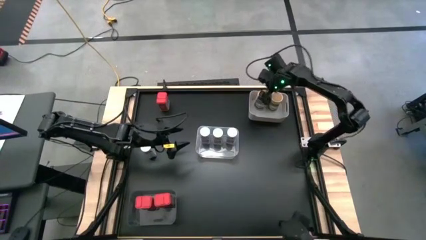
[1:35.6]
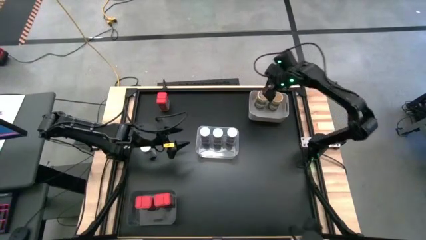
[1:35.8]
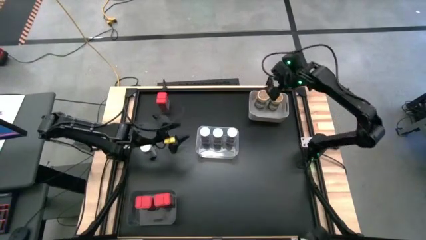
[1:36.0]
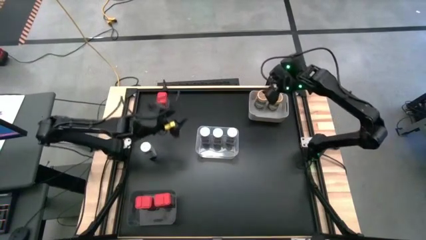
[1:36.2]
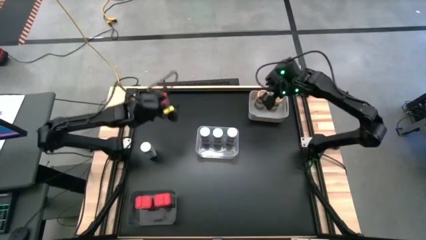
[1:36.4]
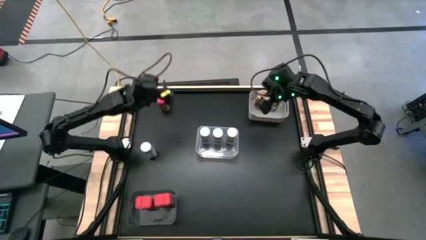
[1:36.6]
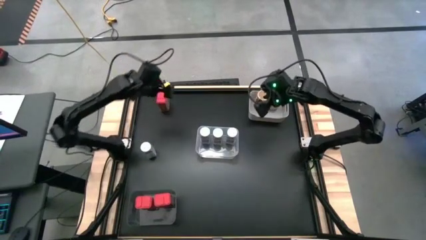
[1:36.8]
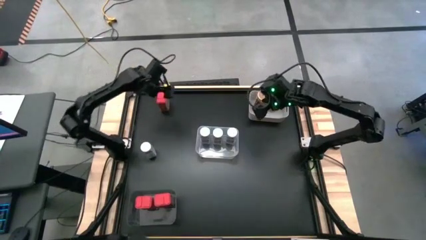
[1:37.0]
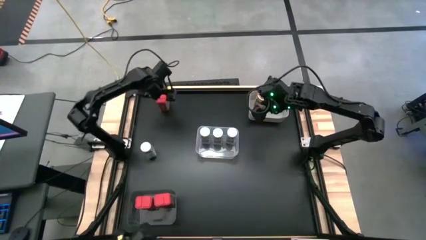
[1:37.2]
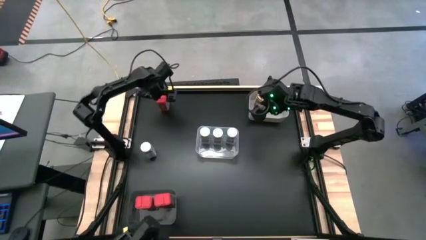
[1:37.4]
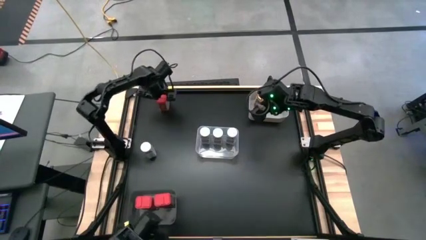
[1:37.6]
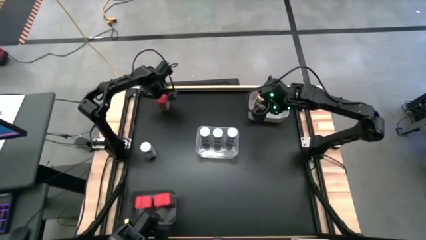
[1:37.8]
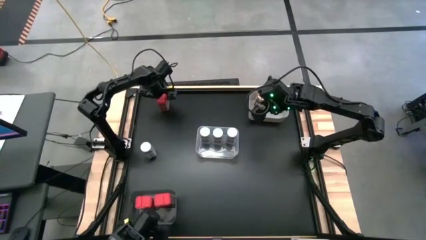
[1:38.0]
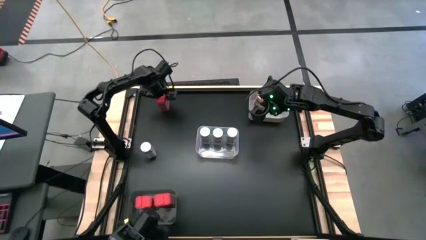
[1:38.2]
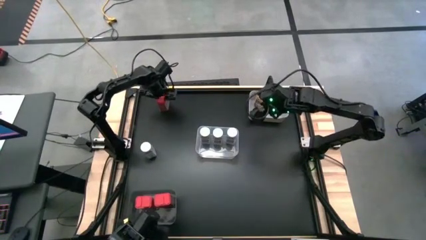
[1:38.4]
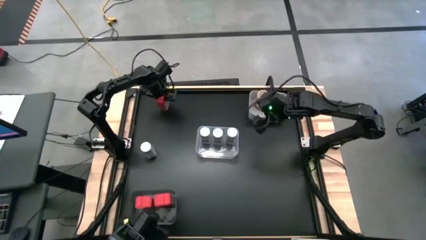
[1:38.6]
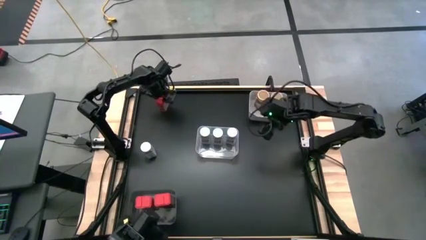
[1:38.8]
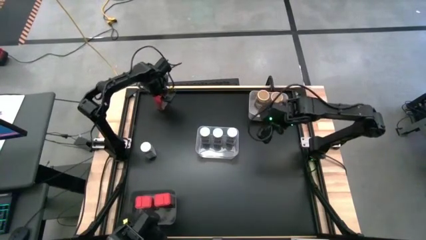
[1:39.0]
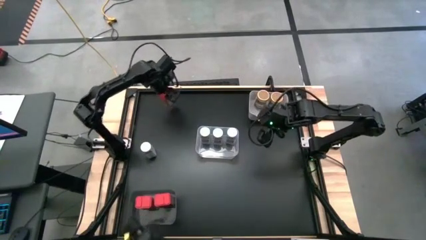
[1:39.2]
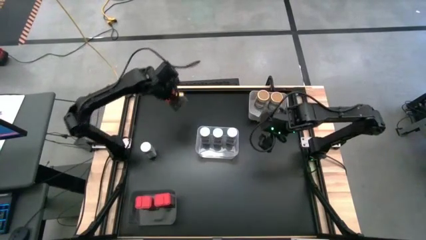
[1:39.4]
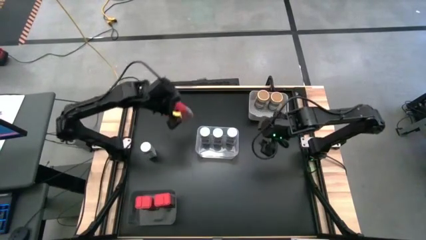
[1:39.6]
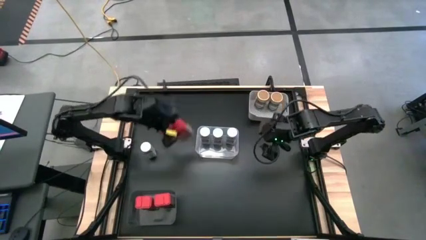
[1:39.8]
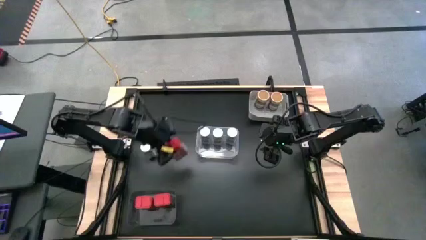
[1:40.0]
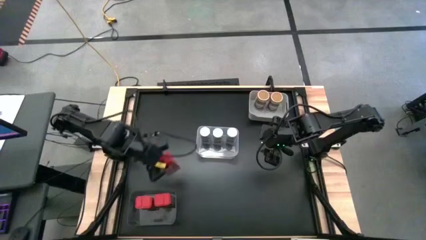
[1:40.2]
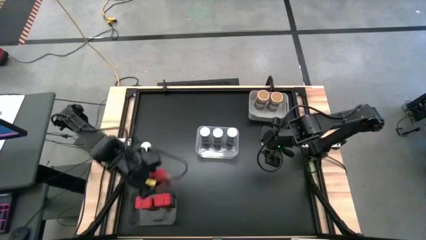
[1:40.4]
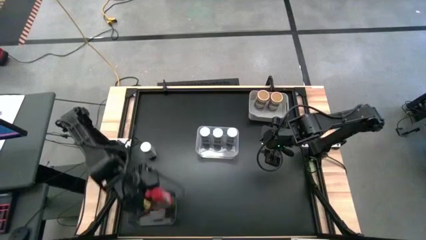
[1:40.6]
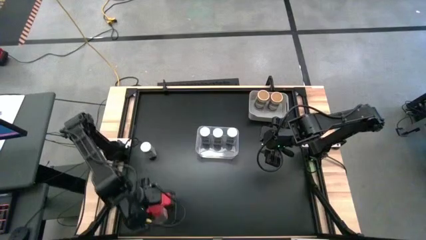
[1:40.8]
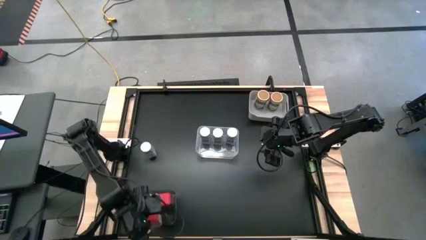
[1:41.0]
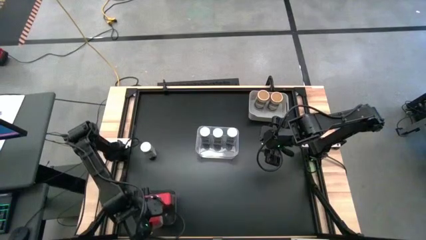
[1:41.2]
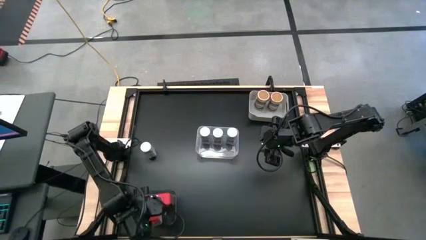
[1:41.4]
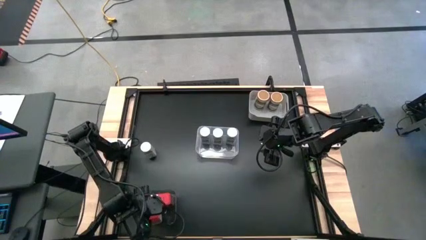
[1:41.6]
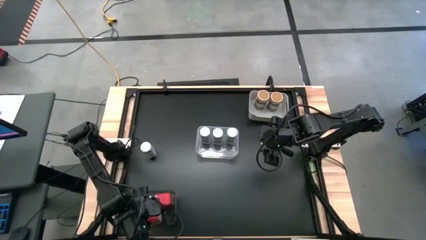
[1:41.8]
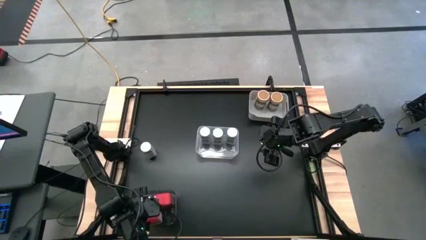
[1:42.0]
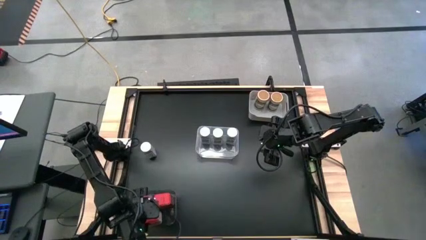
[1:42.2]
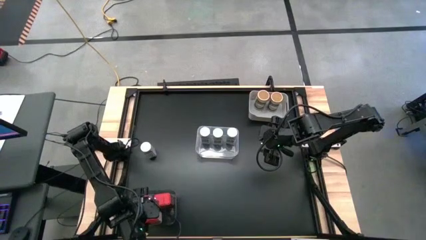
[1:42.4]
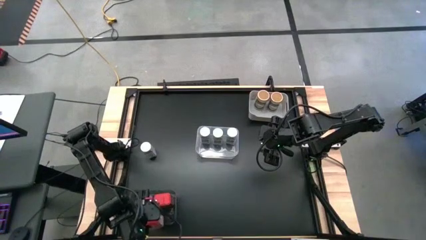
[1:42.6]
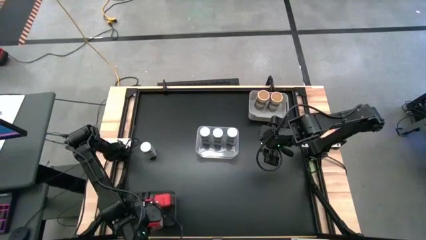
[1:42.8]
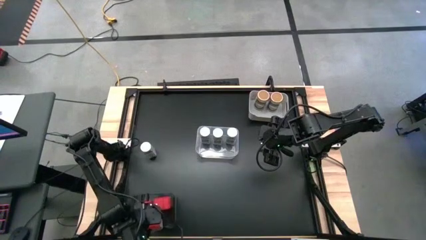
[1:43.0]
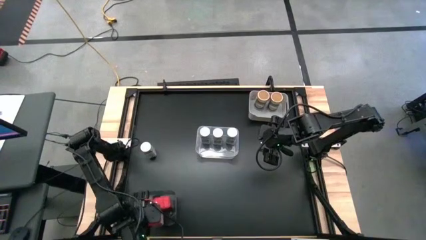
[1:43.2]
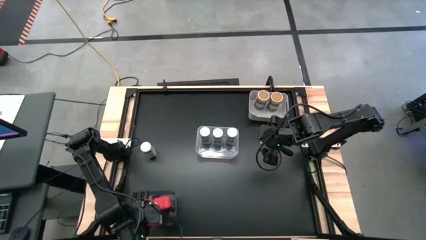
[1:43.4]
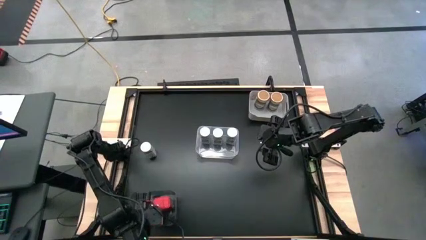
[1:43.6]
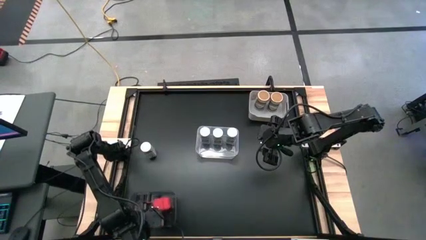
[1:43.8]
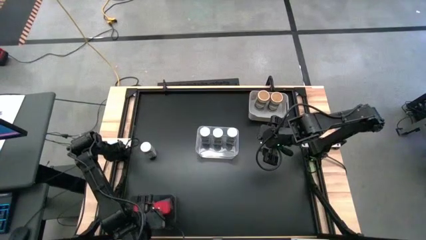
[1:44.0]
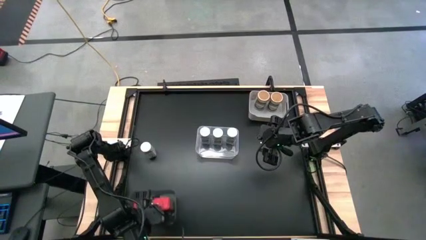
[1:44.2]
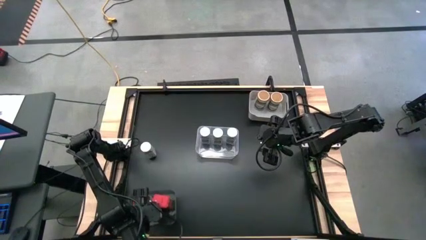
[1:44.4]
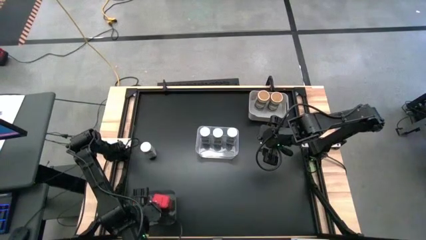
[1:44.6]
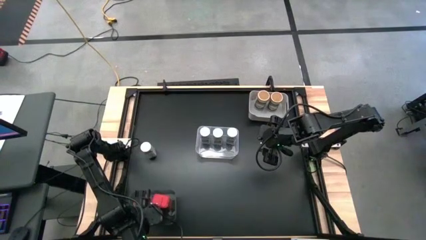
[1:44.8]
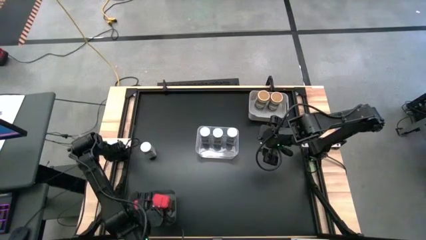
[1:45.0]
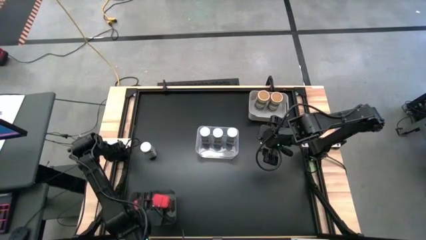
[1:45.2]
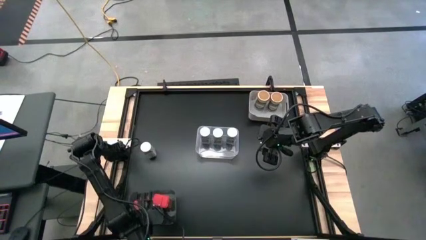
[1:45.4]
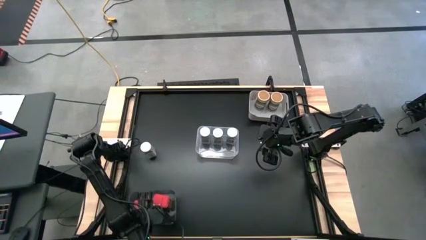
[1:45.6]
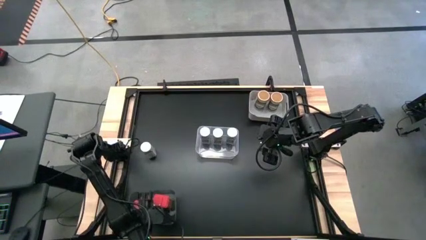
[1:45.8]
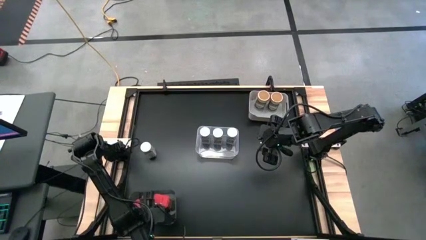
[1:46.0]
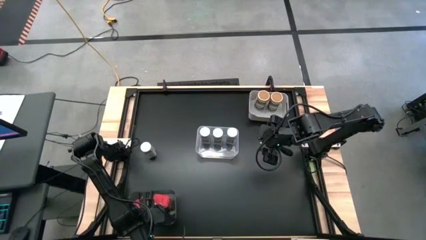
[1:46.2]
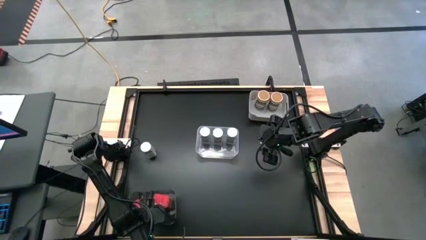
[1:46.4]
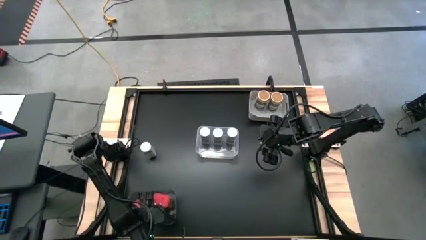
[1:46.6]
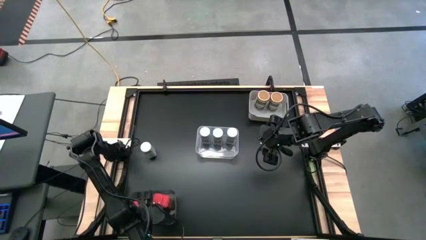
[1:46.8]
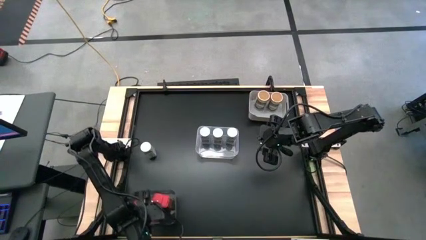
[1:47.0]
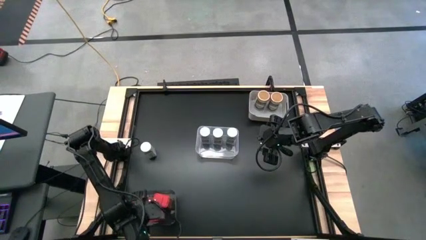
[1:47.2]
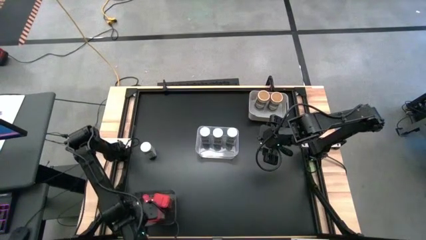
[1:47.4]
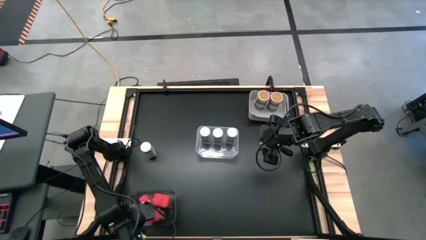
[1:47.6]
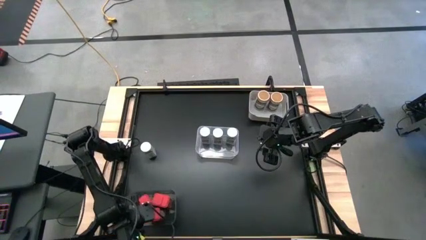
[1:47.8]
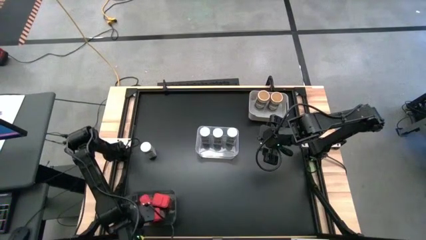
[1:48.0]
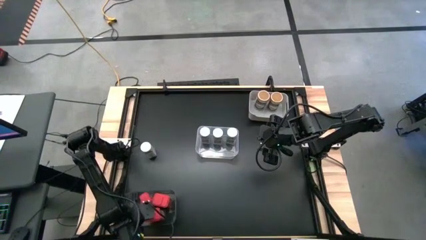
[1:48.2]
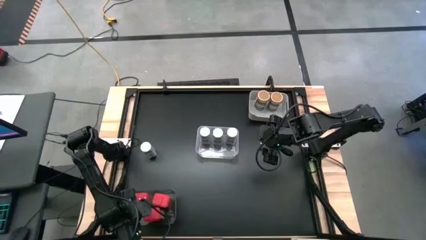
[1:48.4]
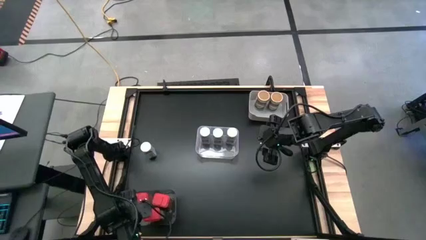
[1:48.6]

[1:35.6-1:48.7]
Task: Sort spices by type
Put the red seasoning can into the black bin

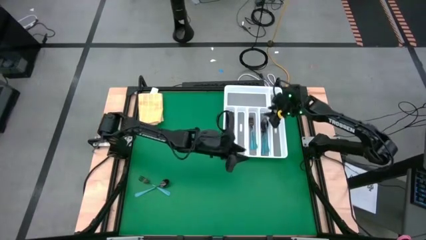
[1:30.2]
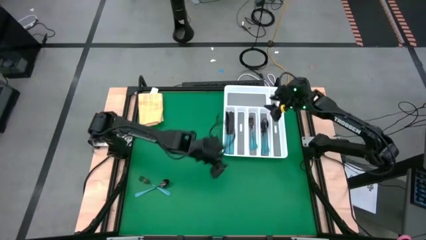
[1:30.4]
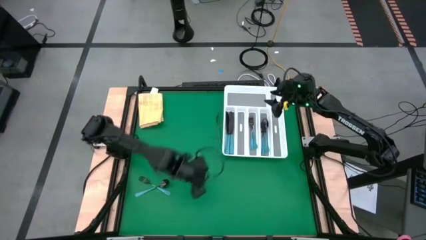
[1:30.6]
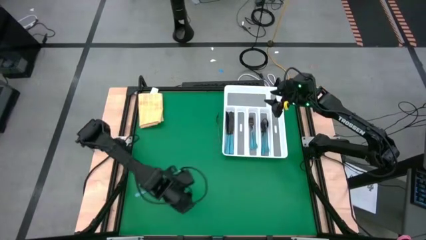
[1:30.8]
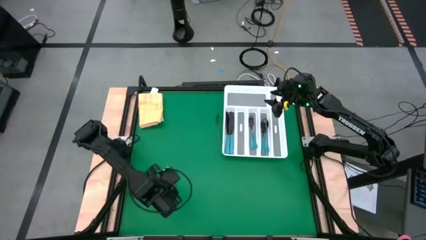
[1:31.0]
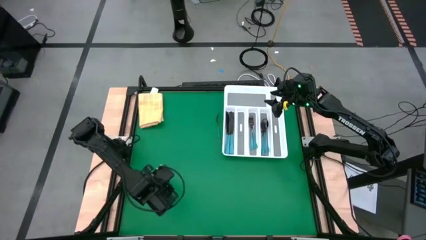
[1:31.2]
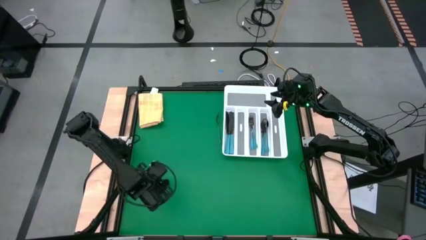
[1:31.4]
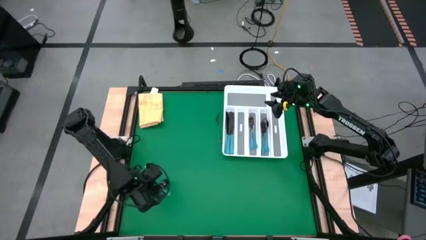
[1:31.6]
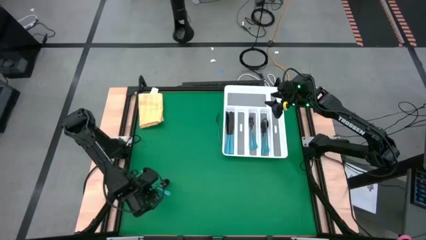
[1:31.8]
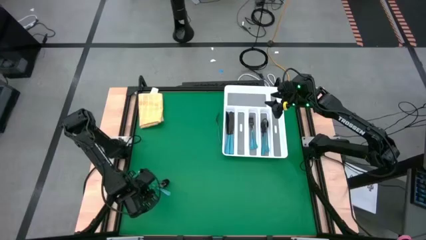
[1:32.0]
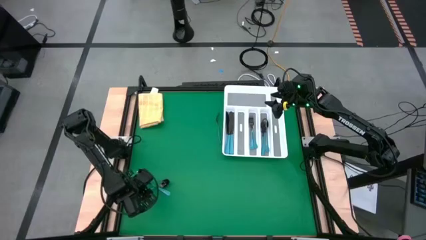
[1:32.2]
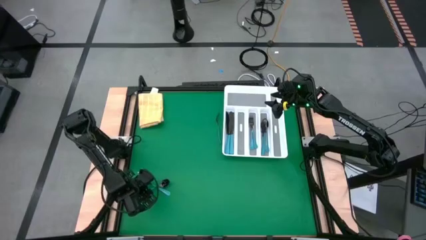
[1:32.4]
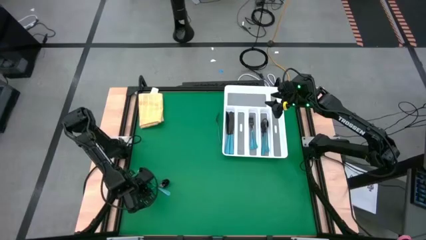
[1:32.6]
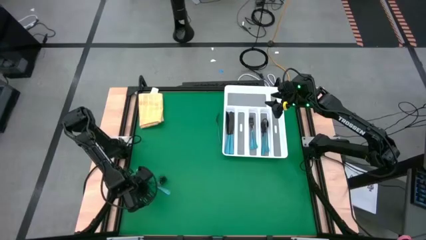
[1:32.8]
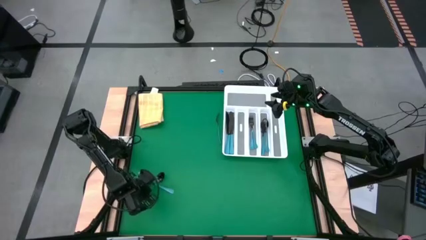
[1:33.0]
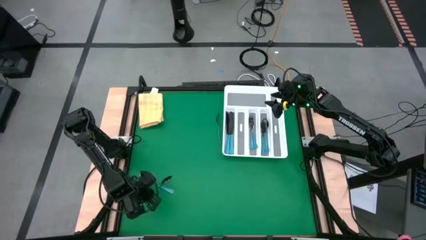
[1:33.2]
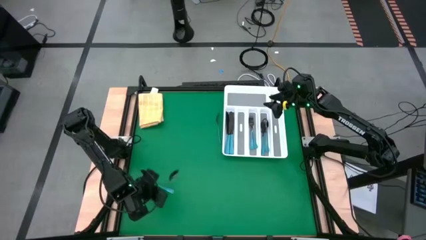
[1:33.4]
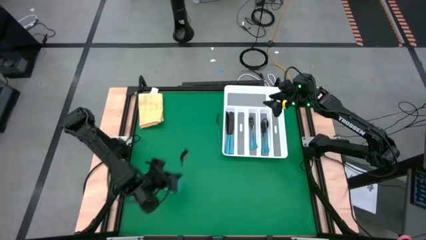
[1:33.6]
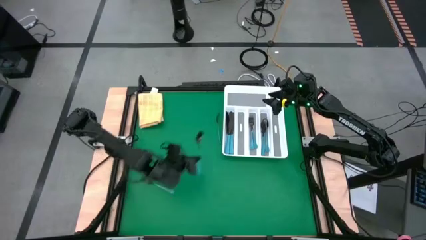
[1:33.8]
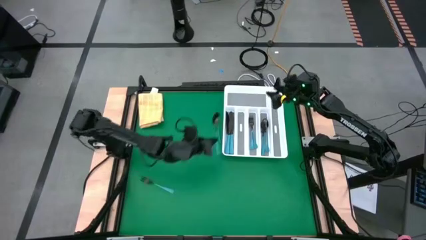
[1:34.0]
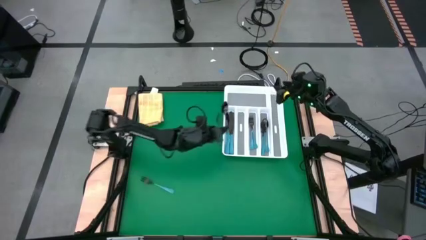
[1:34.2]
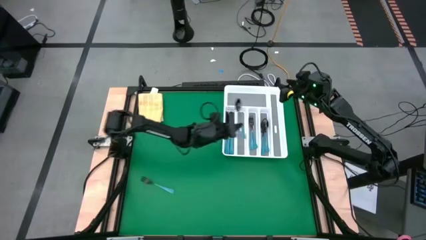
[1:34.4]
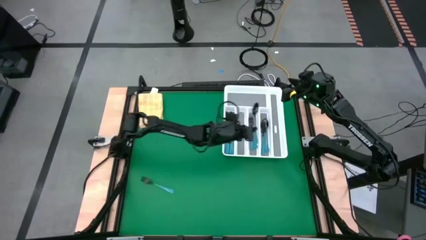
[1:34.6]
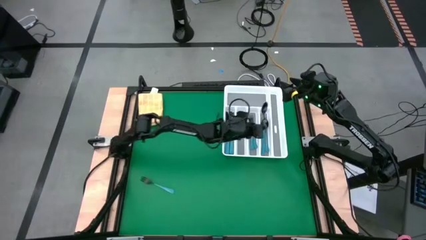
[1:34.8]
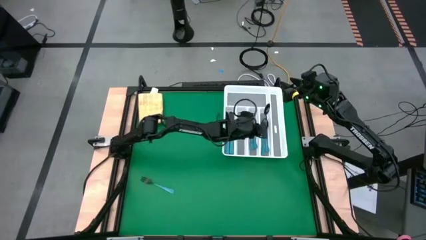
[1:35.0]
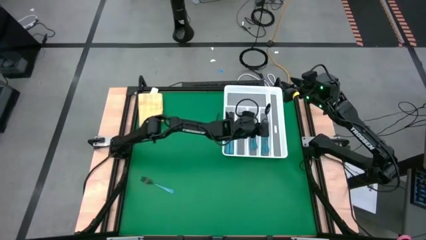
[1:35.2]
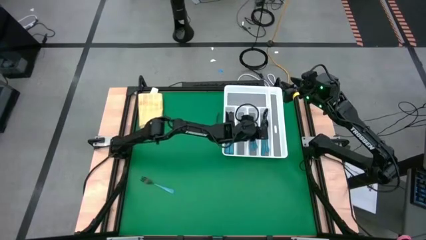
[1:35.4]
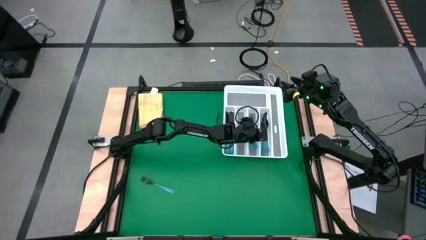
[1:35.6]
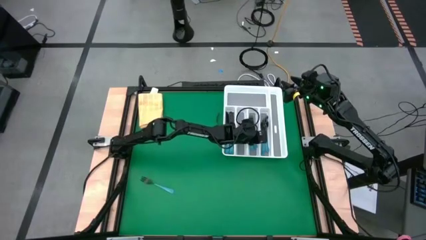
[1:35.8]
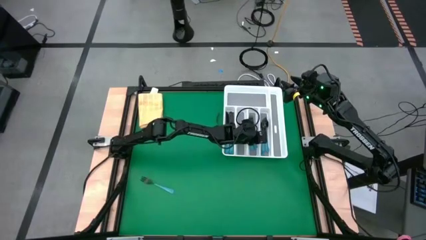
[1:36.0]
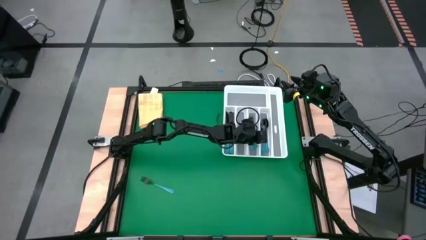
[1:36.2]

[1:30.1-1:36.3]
Task: Sort silverware
Put the blue spoon into the white cutlery tray
